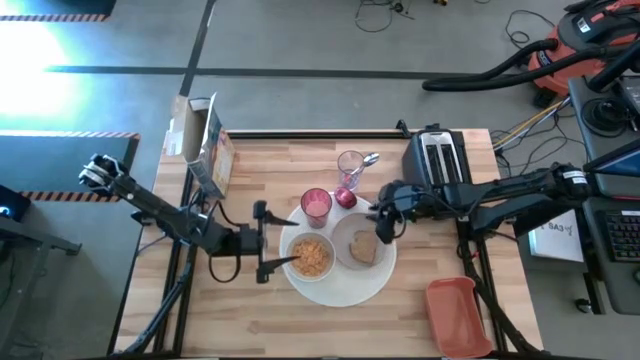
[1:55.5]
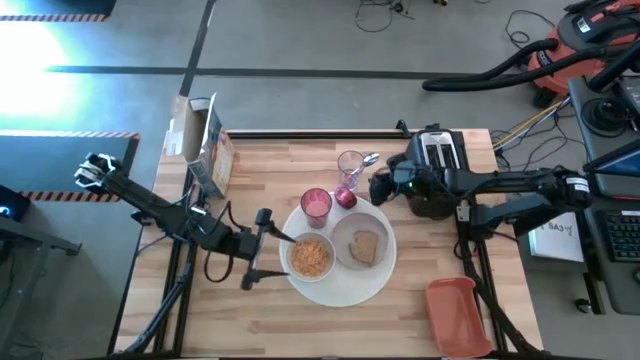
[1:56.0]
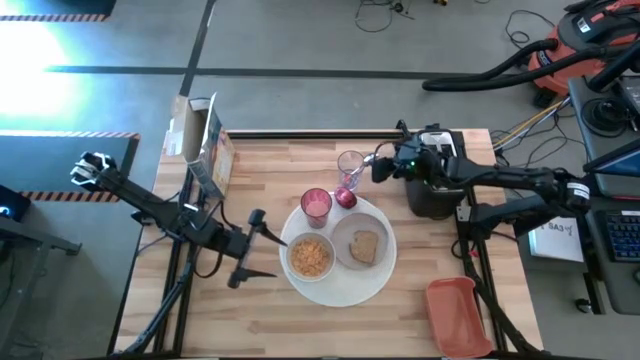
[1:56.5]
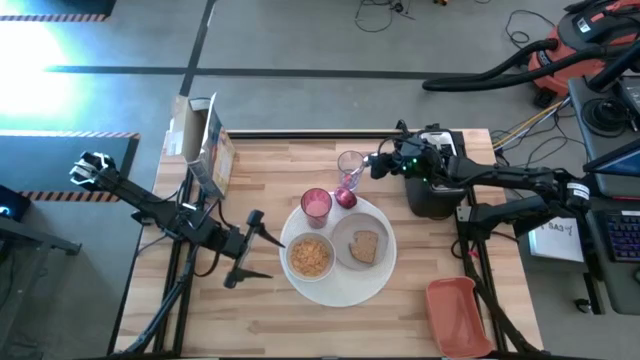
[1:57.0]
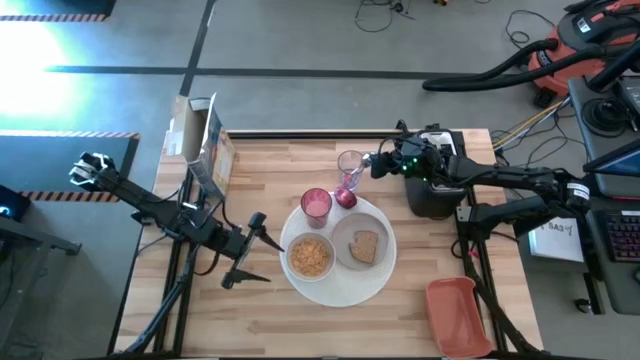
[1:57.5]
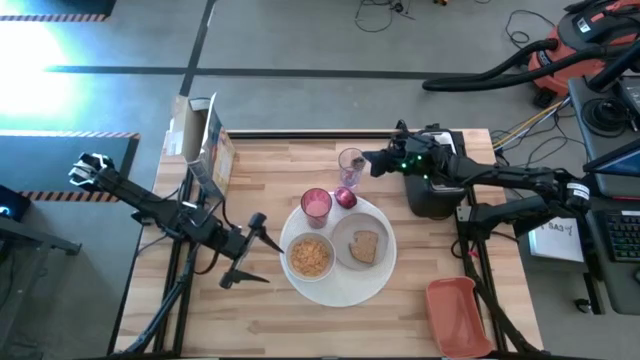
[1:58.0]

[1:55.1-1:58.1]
Task: Arrange a breakfast setting
Put the orange spoon on the white tablemat to the top of the white bowl

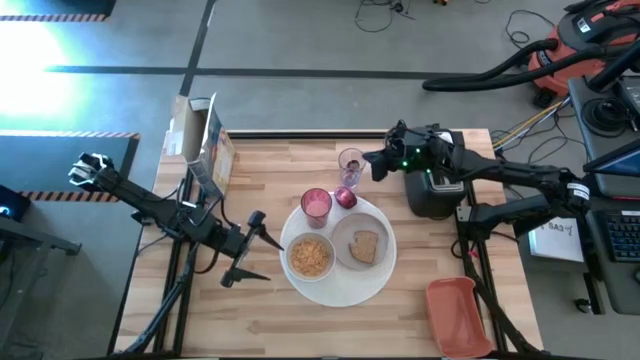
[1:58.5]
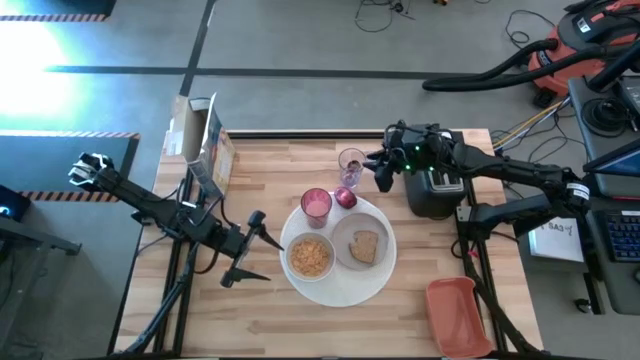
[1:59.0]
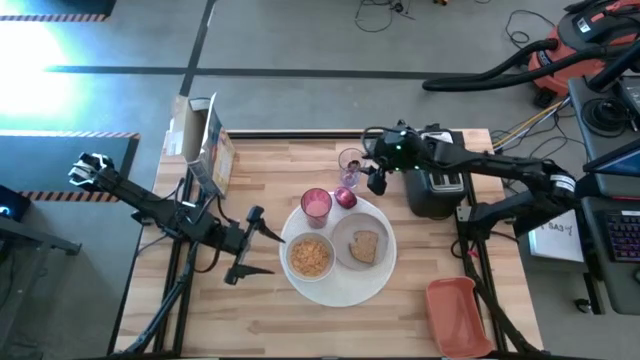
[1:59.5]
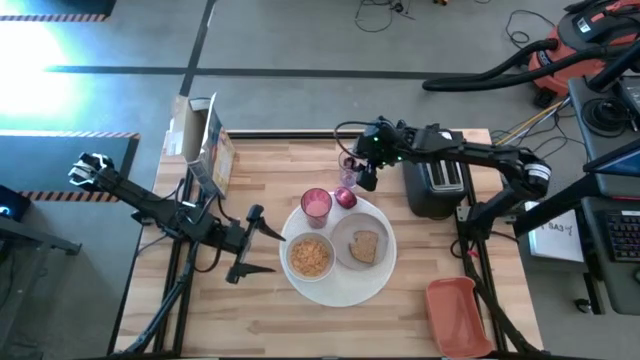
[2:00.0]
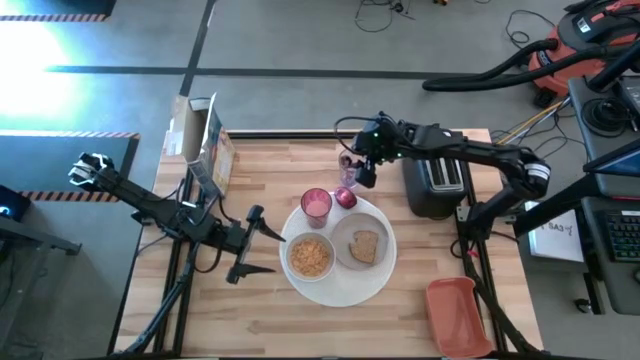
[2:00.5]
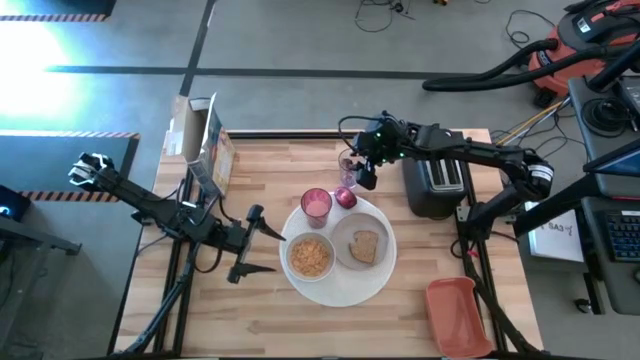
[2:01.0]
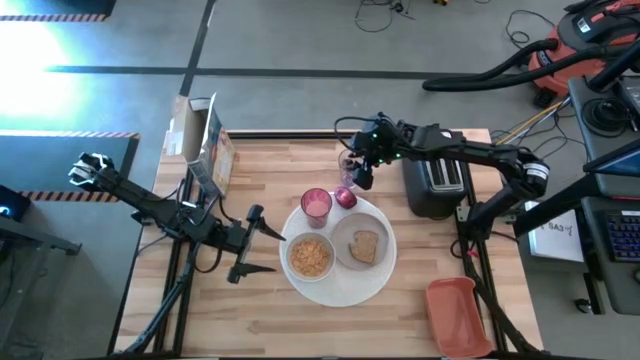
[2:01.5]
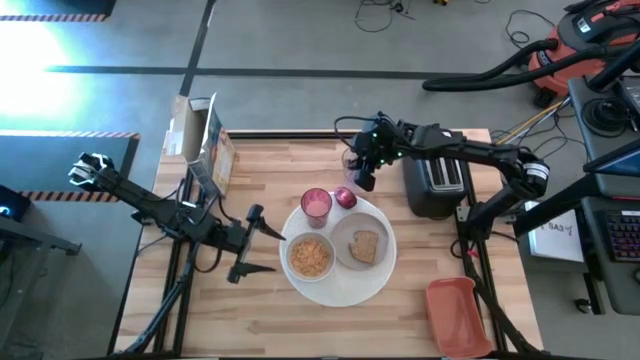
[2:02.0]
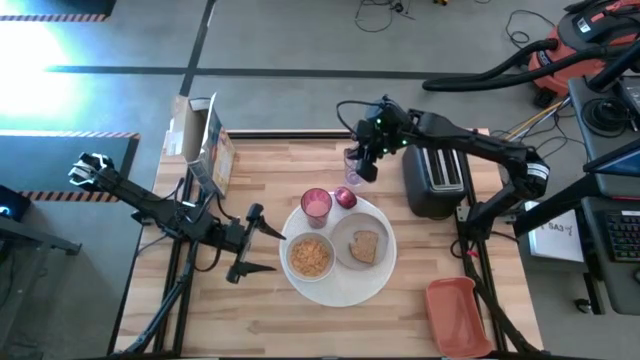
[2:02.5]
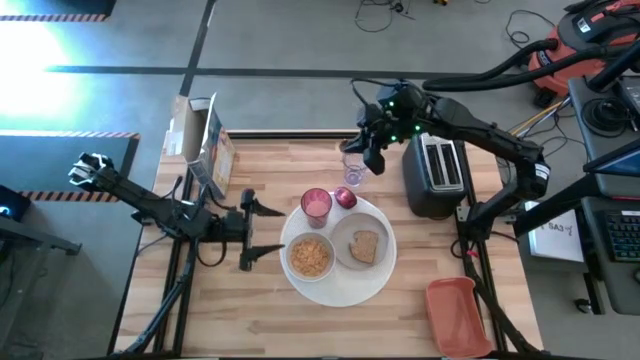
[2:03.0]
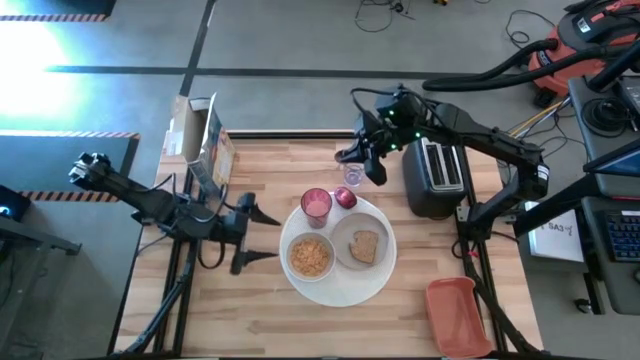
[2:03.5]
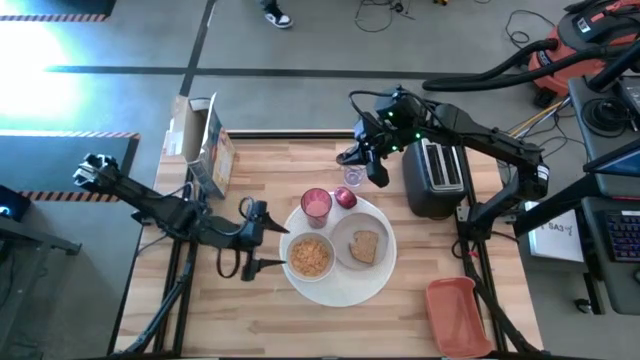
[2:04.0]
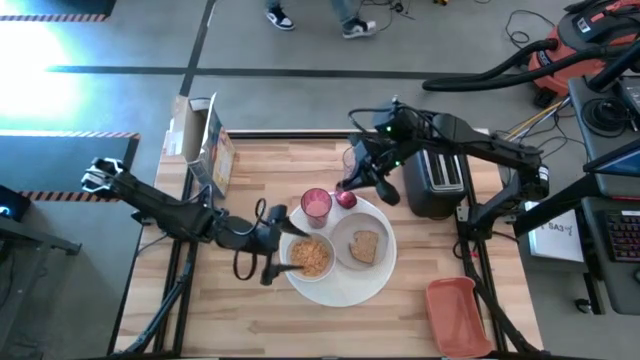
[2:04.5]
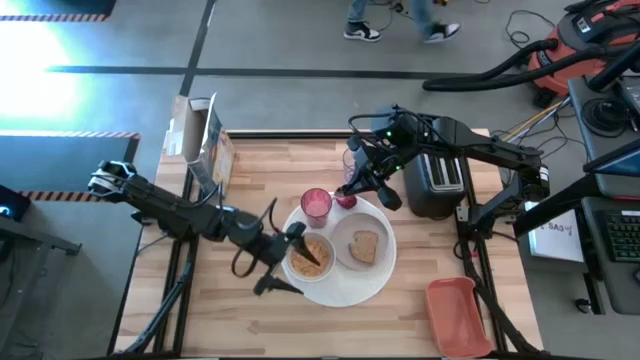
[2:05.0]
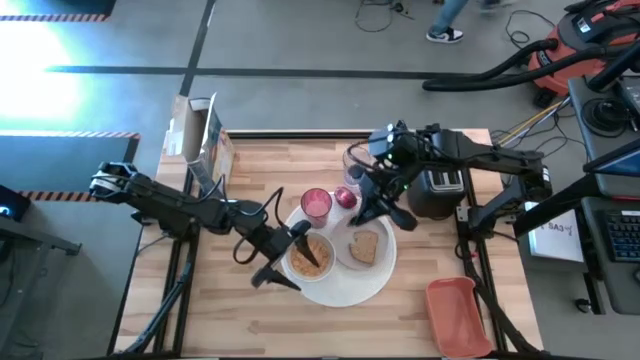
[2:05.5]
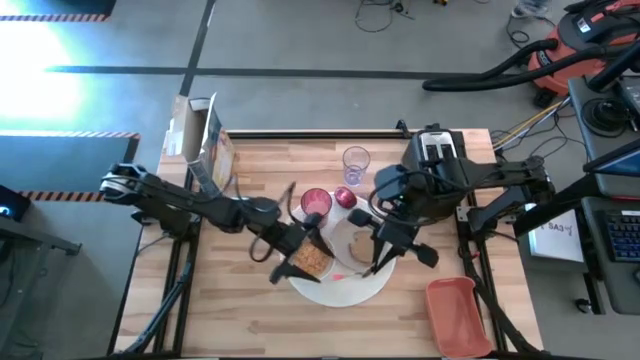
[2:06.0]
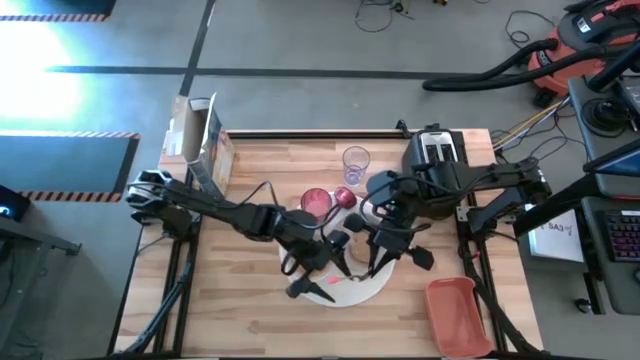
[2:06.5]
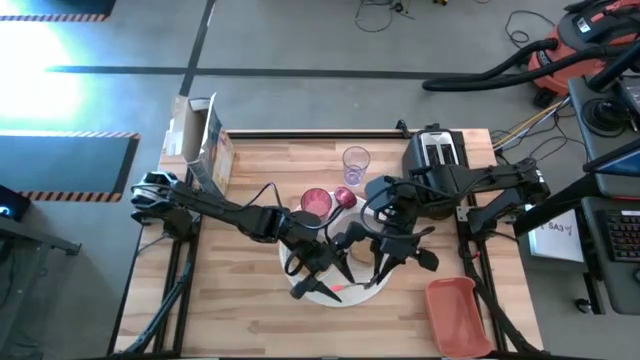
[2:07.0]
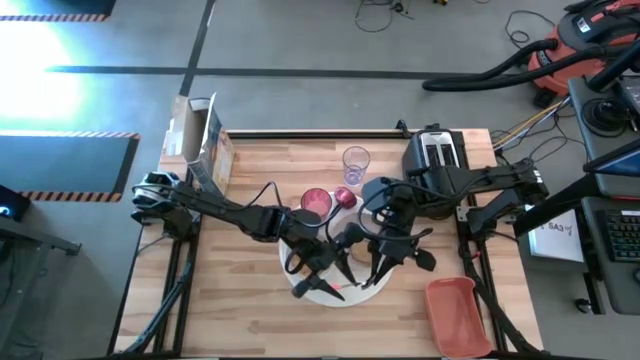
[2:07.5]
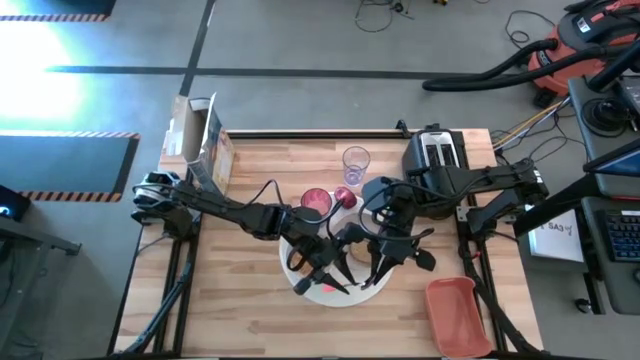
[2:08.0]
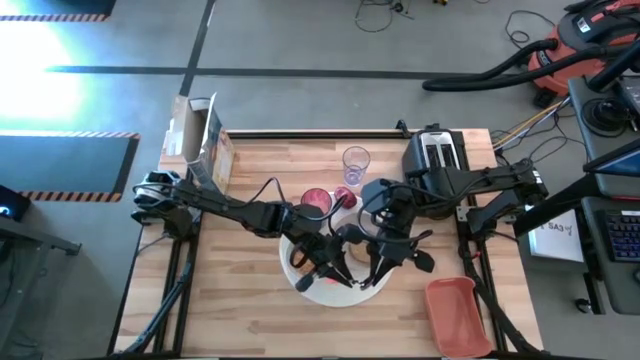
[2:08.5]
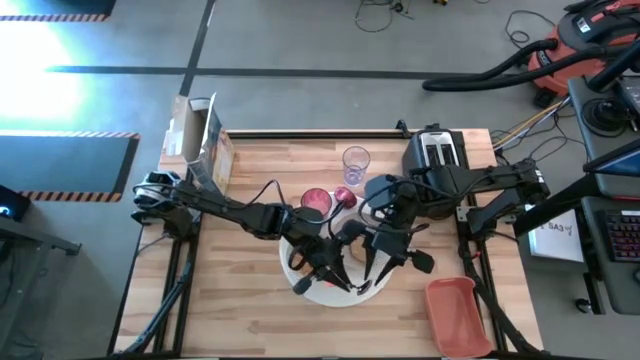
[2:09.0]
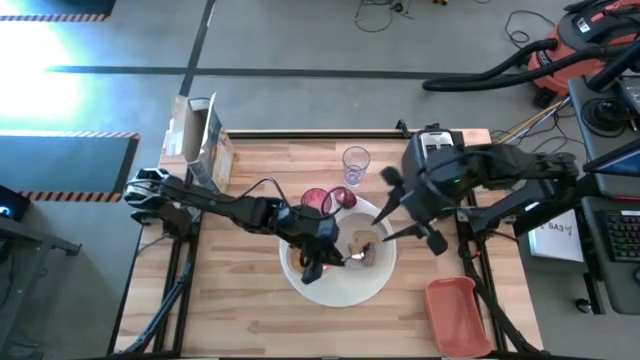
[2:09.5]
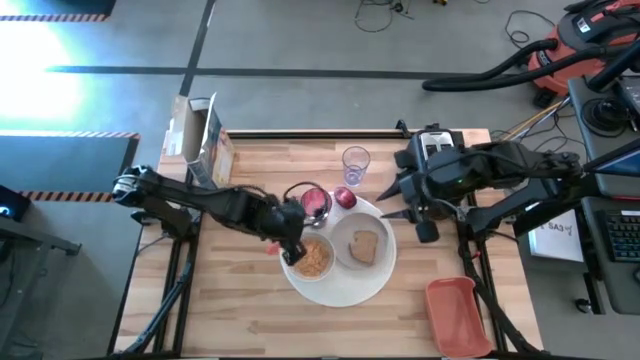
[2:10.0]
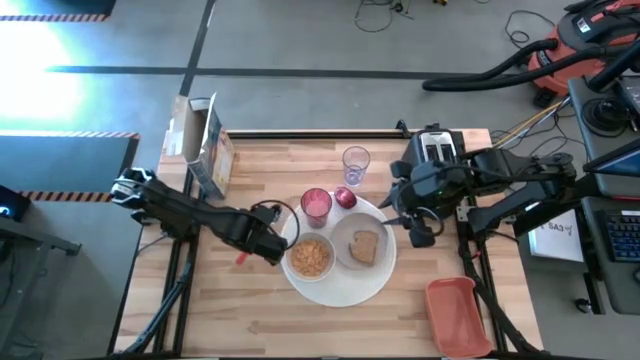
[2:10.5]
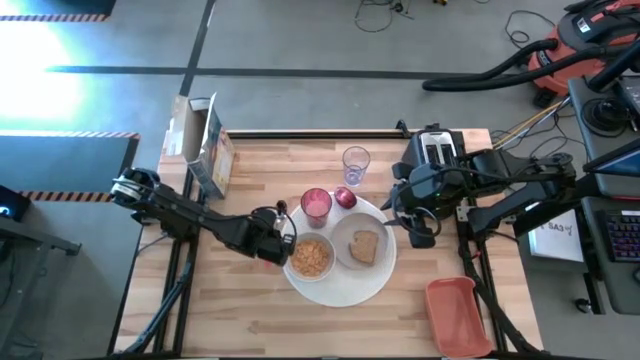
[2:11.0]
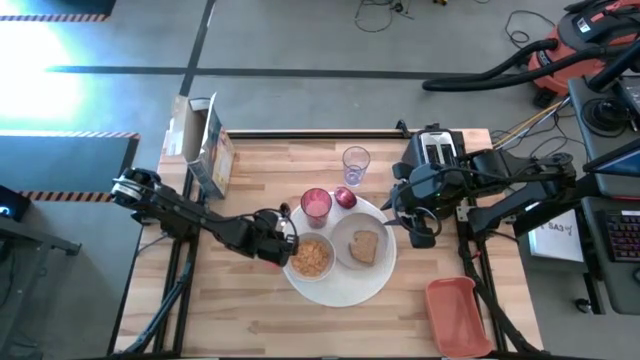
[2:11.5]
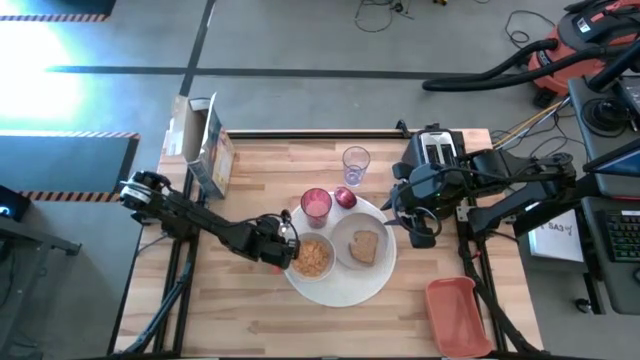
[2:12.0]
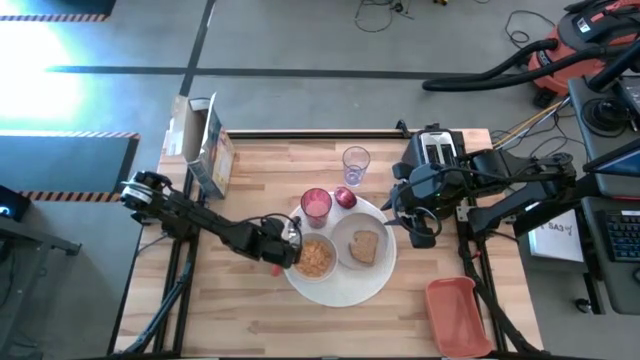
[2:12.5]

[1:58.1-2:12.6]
Put the orange spoon on the white tablemat to the top of the white bowl

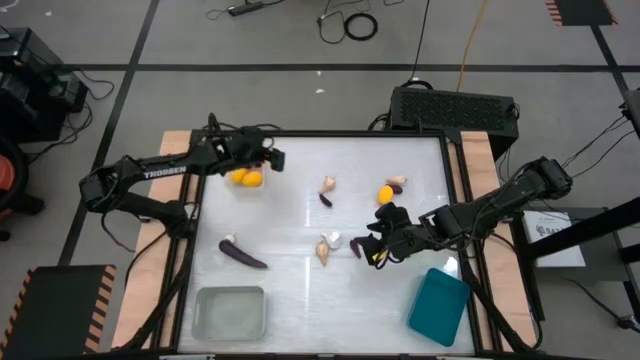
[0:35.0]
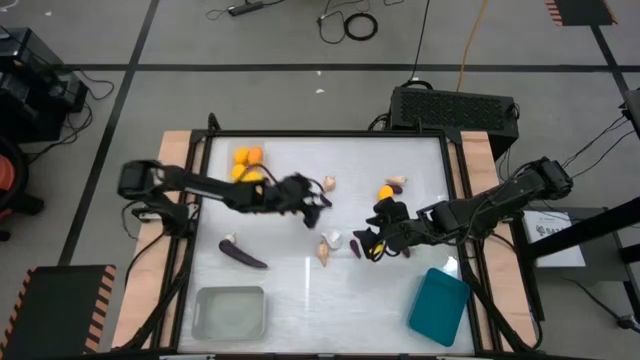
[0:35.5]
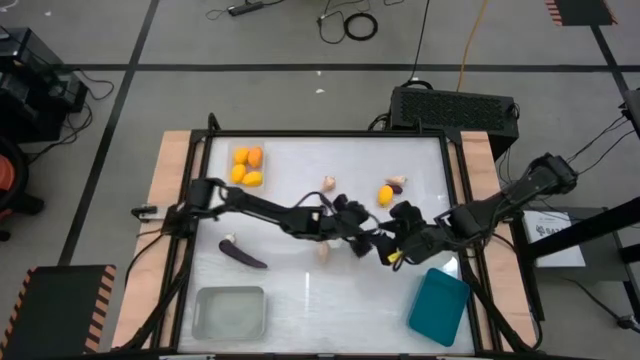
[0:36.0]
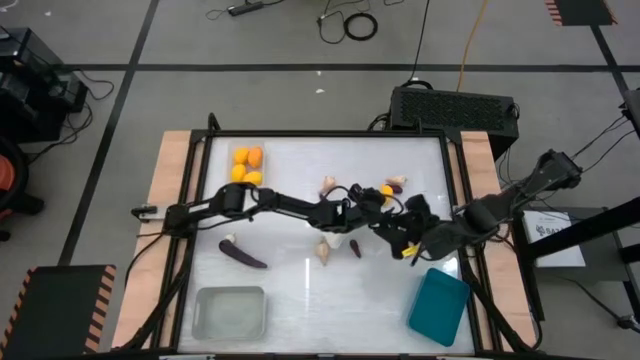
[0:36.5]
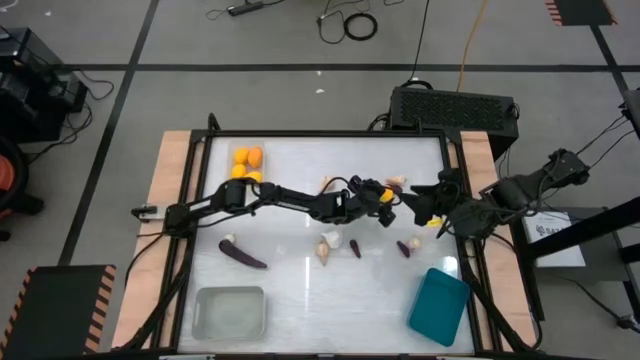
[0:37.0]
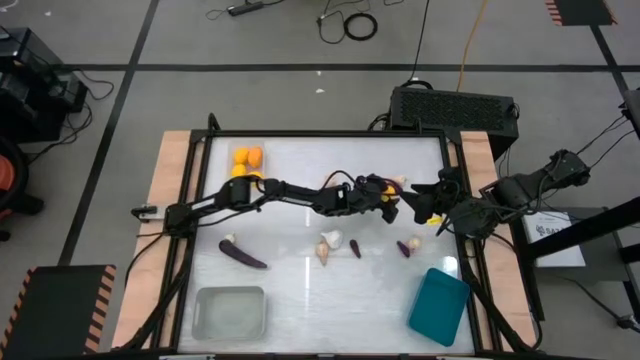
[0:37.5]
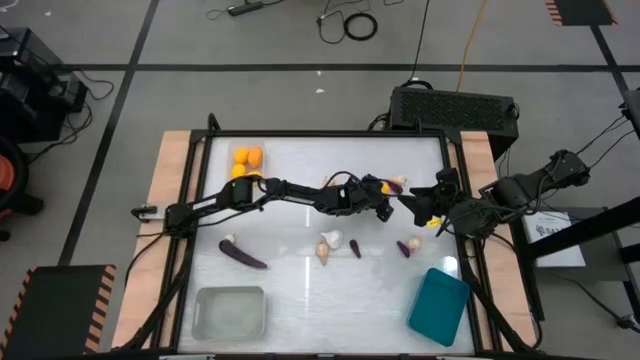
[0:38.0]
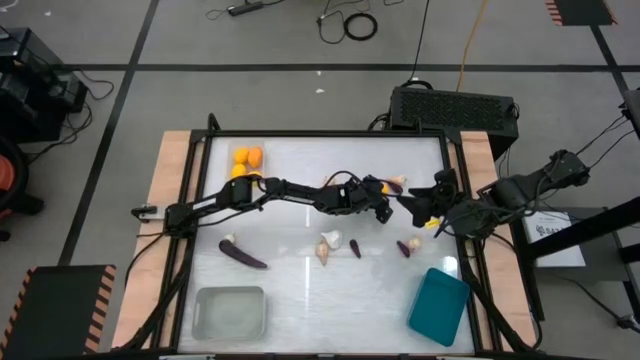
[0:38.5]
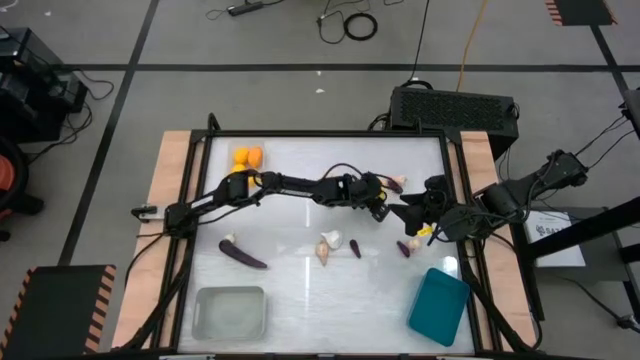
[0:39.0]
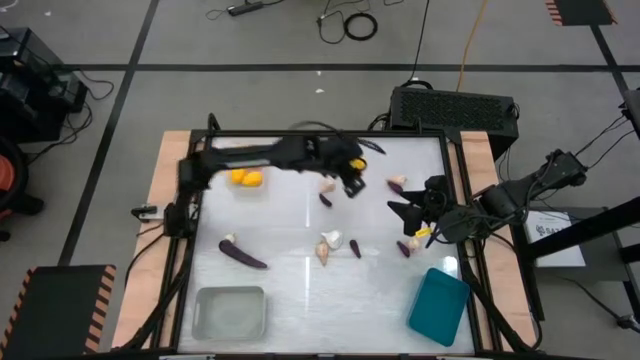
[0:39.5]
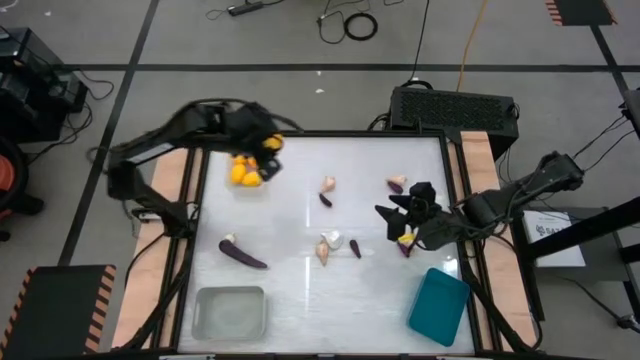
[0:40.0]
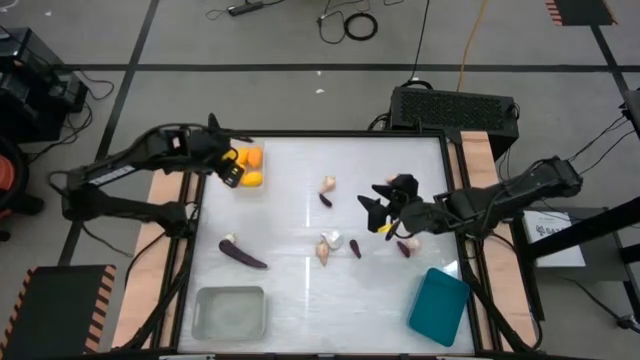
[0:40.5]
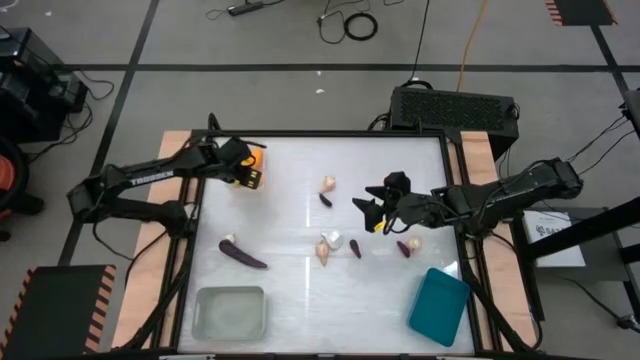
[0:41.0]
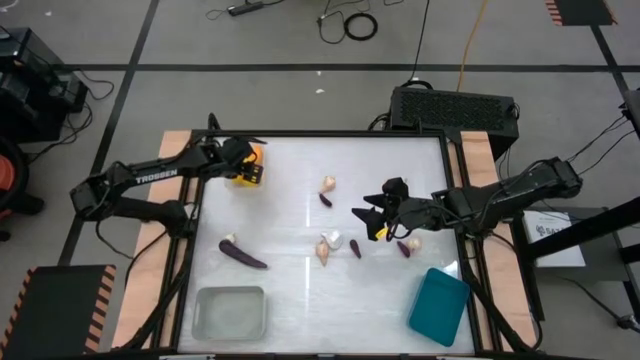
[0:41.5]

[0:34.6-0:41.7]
Task: Sort produce into baskets
Put the yellow lemon into the white bin
